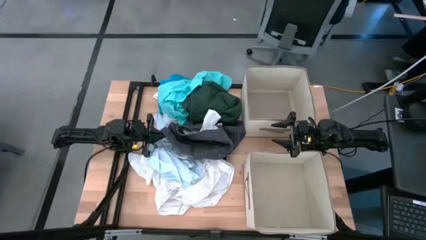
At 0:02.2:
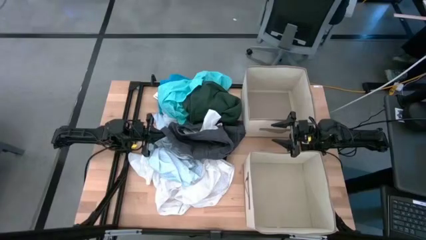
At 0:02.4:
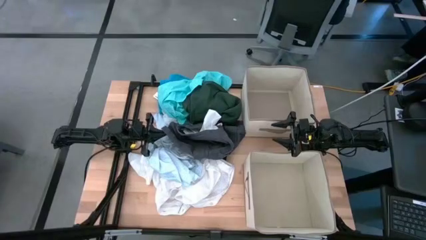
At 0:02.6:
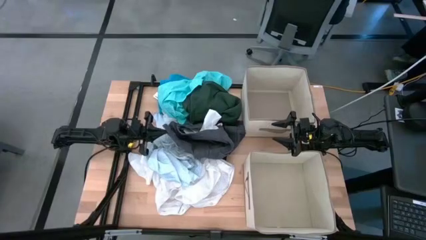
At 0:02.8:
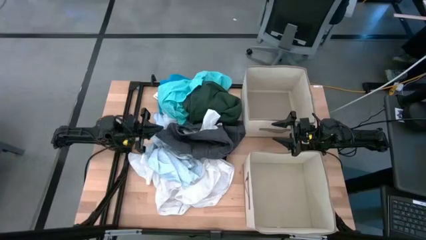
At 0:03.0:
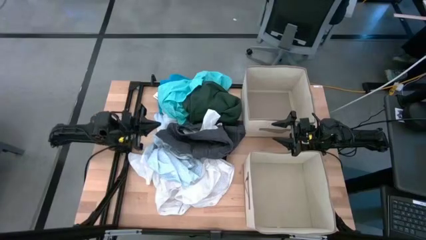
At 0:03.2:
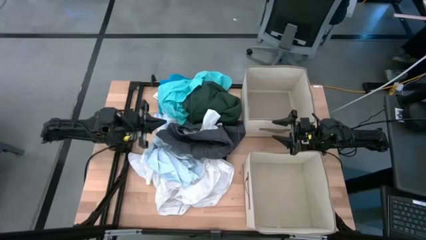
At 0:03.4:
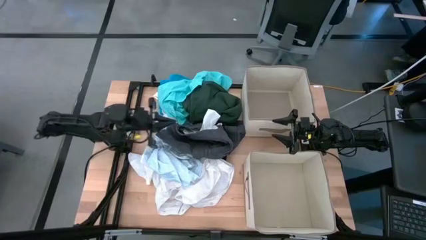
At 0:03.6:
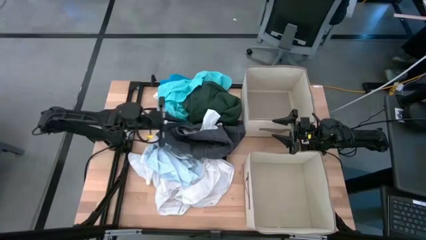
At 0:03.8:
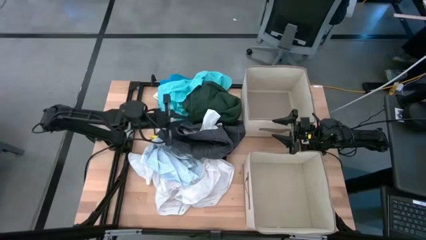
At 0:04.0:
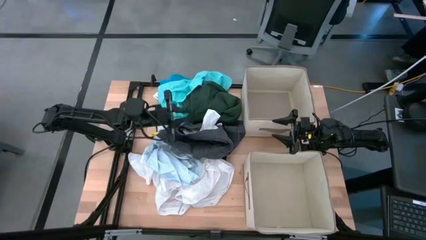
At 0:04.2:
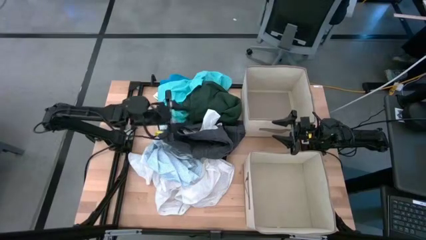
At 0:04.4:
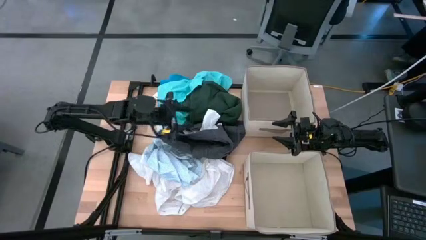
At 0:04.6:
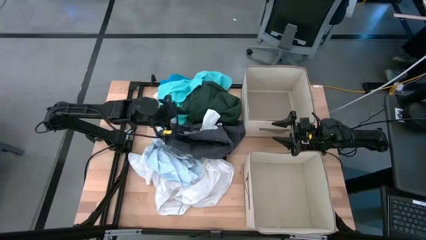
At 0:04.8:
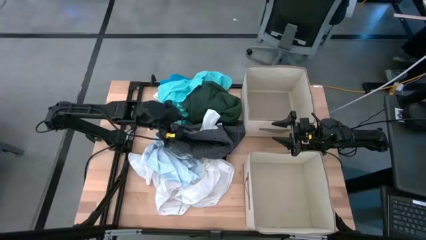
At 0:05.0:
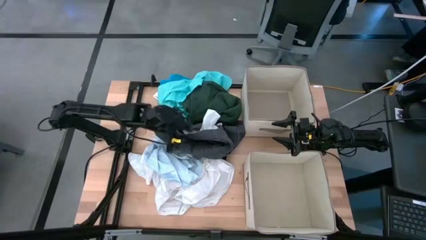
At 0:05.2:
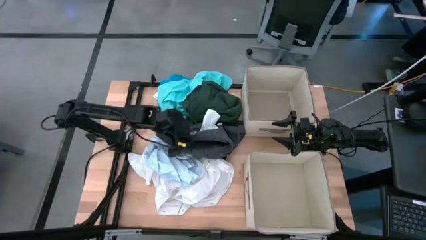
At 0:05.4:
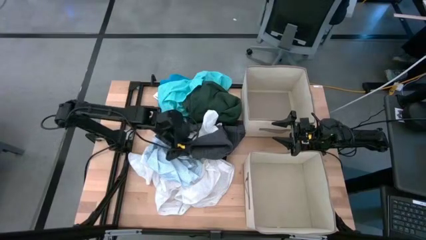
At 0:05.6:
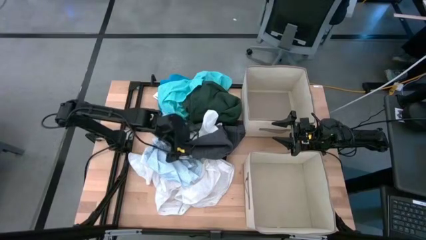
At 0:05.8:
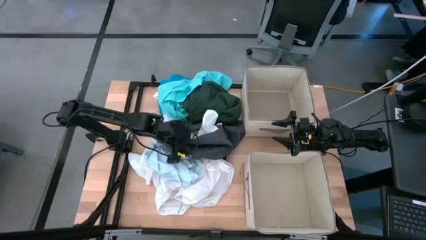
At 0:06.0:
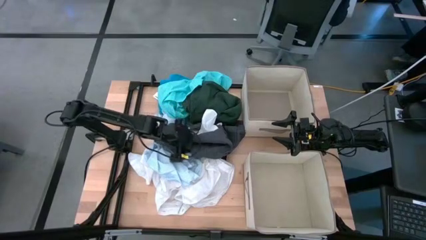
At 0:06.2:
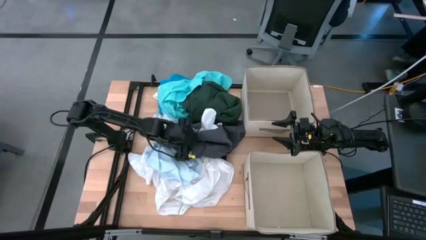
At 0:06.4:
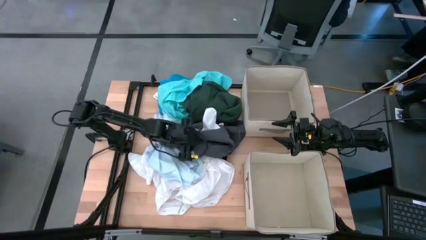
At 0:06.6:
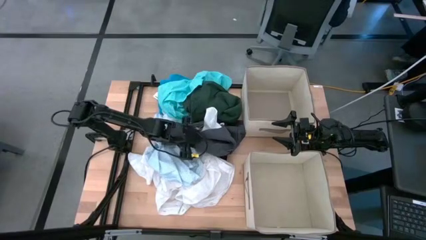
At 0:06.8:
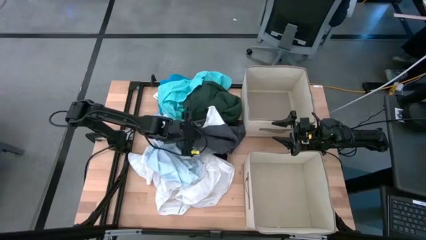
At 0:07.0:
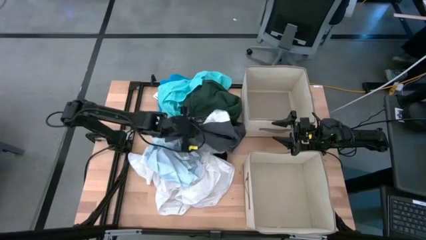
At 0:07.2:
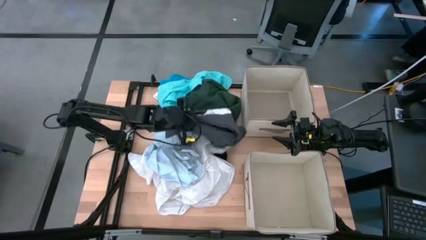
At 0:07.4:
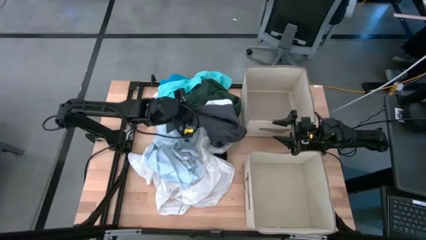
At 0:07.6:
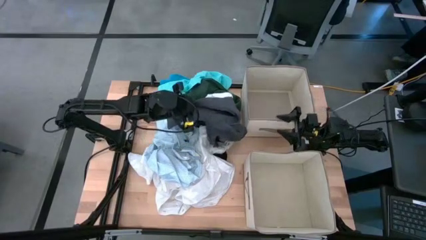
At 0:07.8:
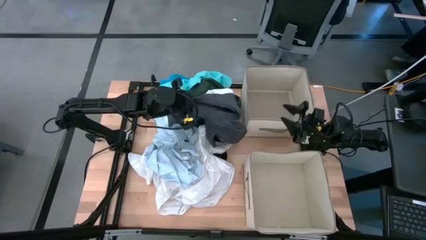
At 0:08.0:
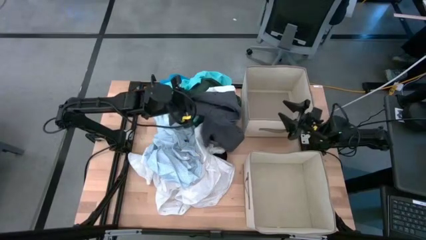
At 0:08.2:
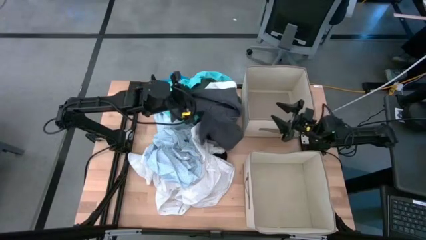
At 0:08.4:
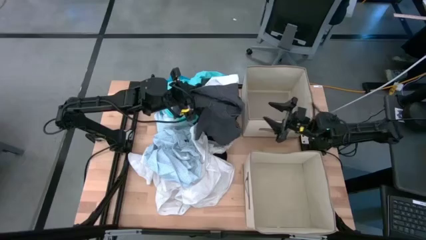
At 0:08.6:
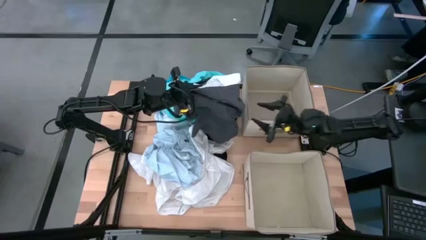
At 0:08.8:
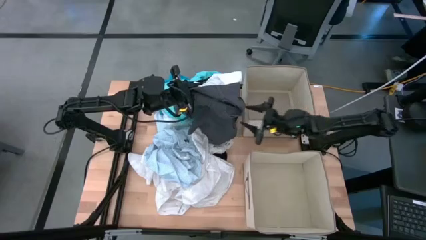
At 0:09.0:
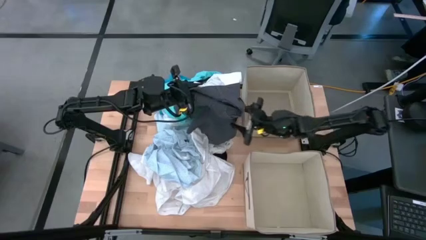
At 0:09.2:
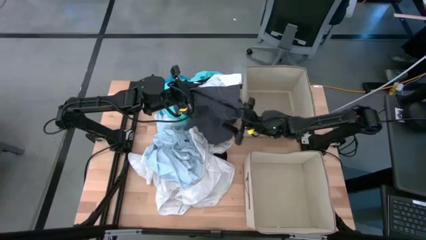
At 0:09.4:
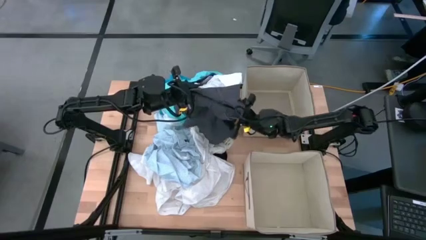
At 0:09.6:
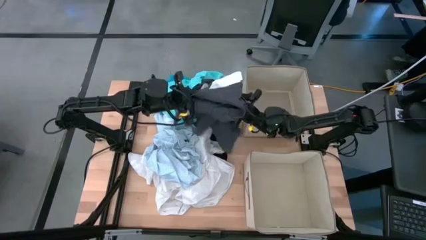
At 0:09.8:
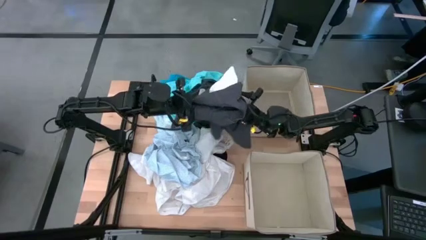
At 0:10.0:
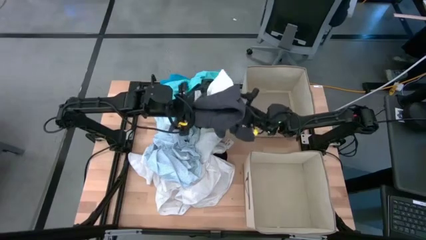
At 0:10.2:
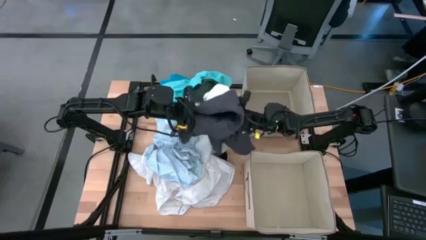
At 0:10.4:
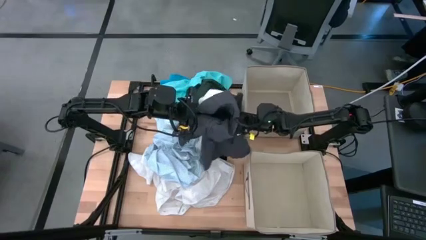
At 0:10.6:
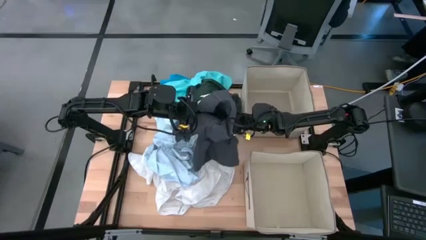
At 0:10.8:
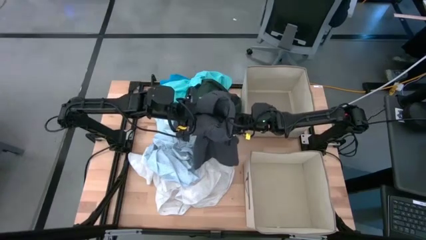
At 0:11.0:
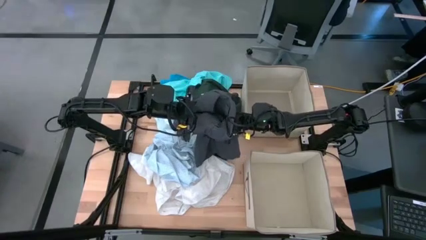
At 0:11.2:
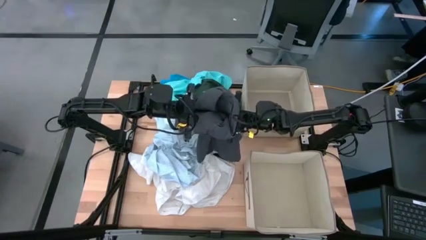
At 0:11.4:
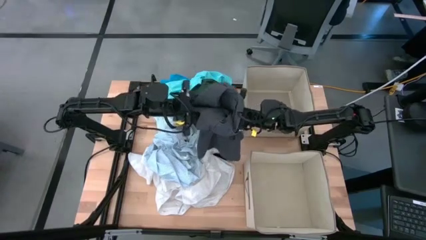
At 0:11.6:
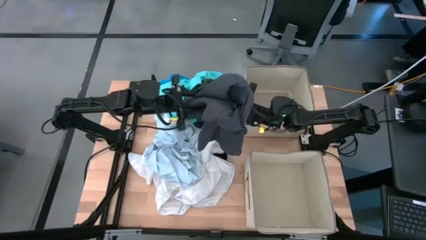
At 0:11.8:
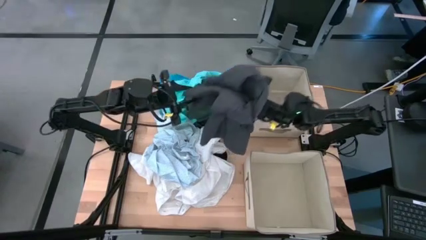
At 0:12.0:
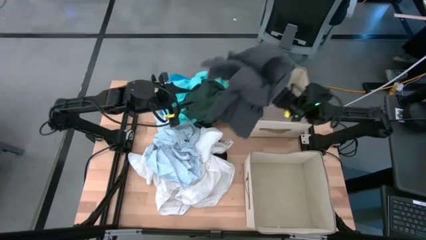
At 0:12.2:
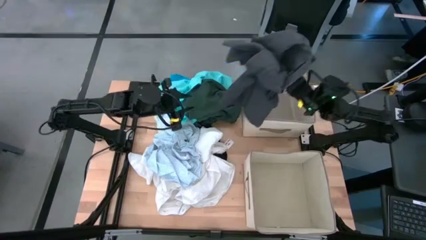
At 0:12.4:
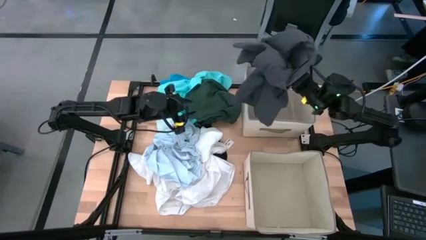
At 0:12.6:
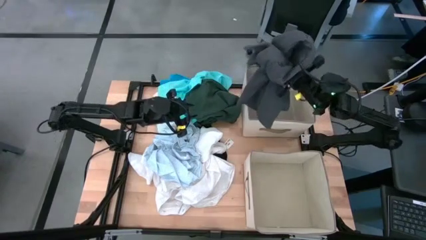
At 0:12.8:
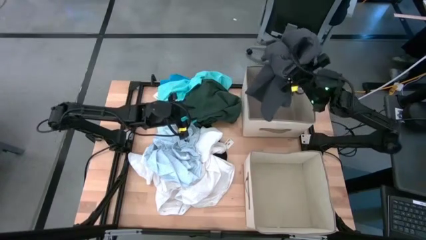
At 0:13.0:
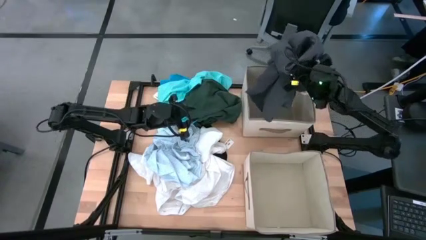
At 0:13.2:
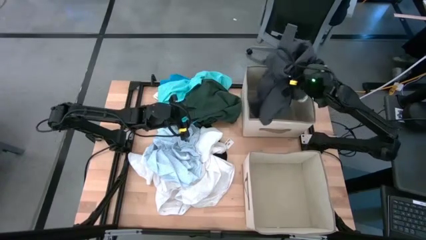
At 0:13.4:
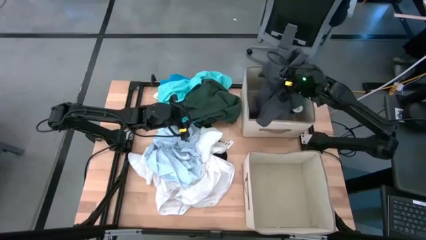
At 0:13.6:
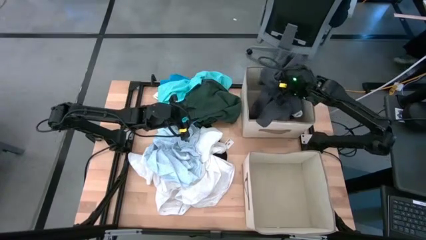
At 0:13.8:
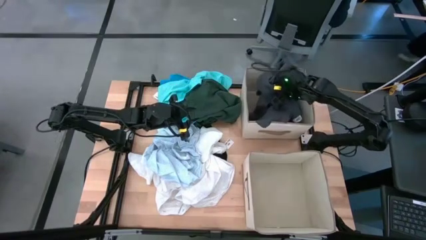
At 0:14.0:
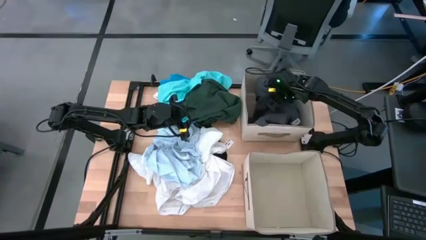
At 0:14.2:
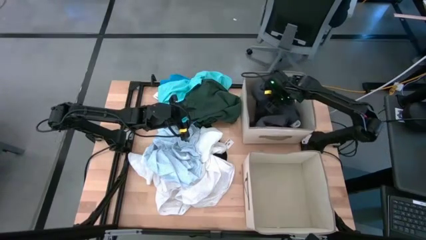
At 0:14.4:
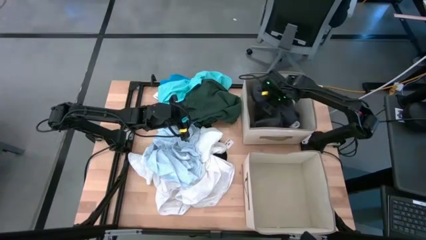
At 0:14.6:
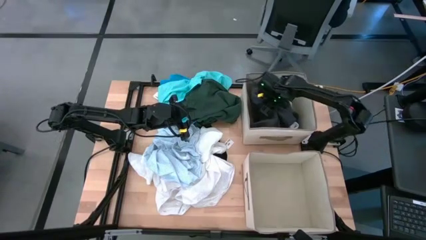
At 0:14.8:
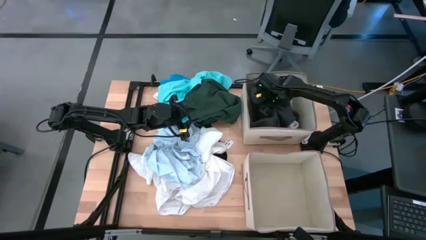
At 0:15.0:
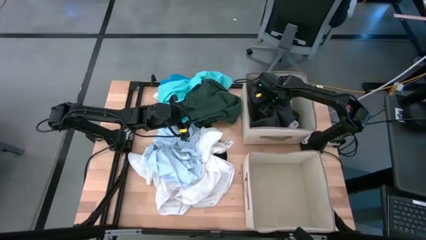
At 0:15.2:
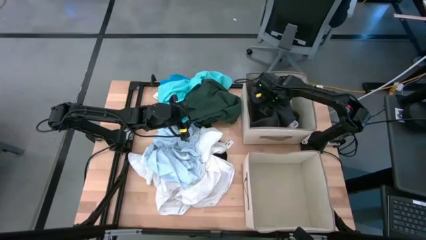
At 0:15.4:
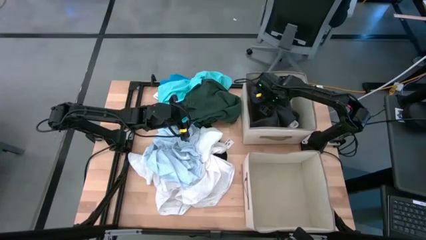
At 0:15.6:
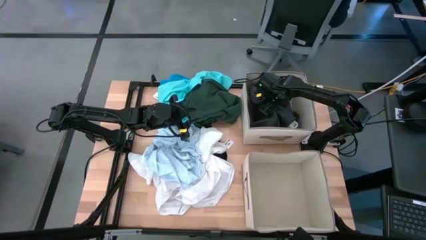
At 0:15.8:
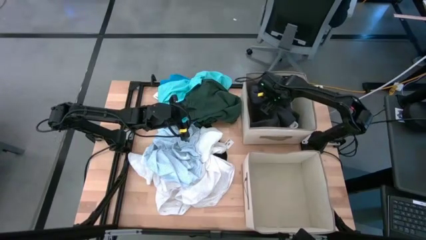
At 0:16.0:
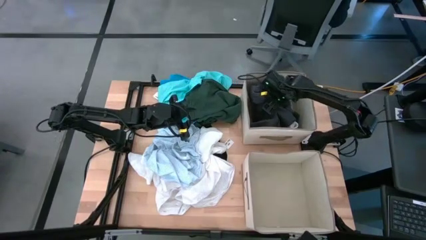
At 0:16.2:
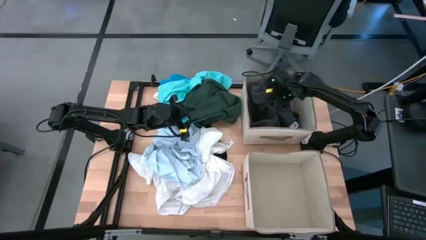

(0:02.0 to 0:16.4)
Task: Sort clothes
Put the black shorts into the top bin
